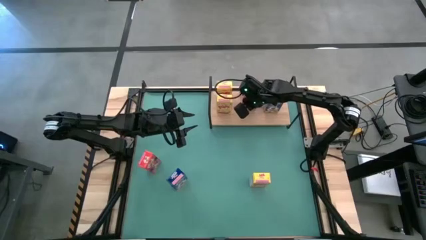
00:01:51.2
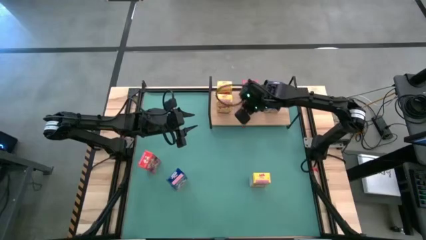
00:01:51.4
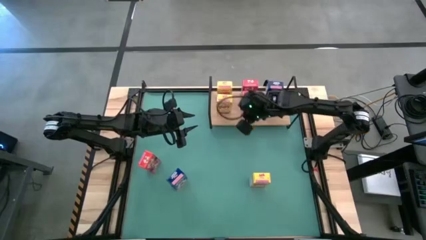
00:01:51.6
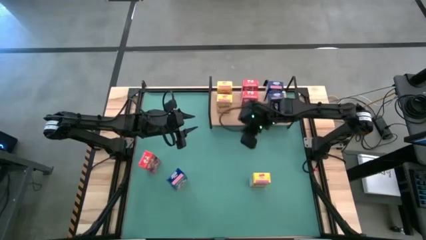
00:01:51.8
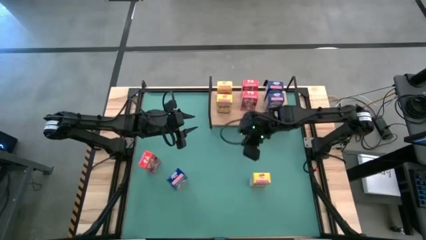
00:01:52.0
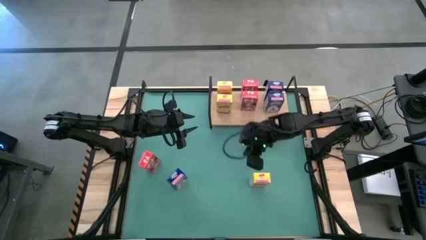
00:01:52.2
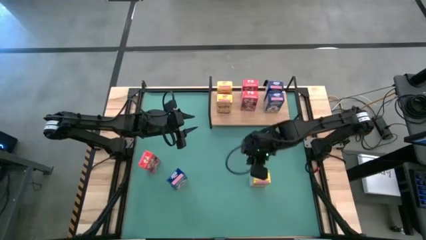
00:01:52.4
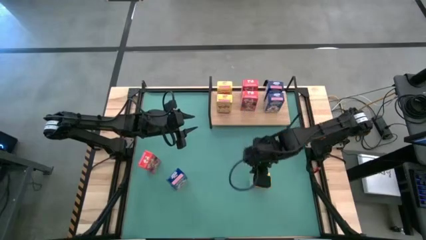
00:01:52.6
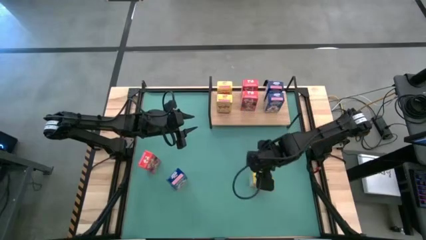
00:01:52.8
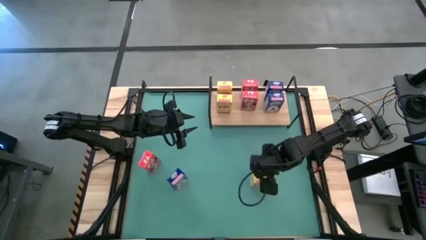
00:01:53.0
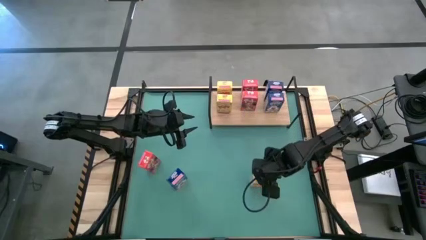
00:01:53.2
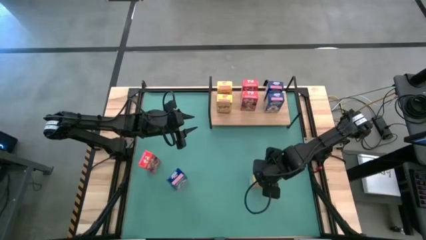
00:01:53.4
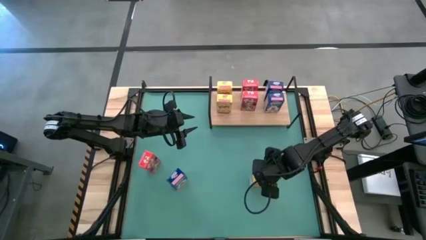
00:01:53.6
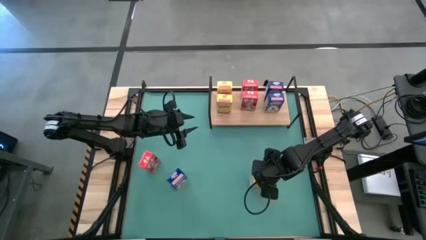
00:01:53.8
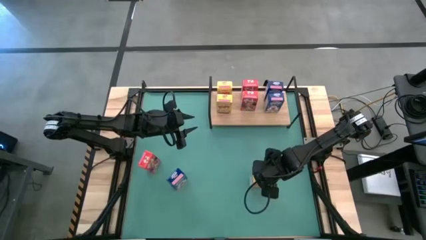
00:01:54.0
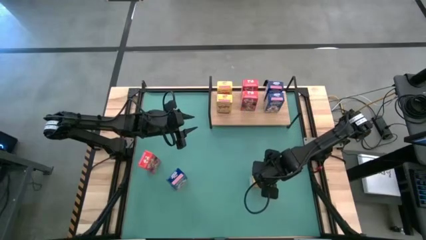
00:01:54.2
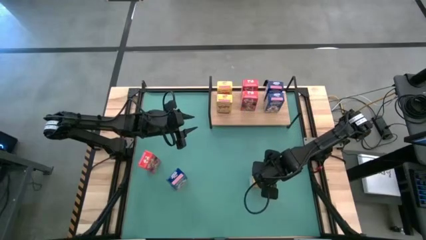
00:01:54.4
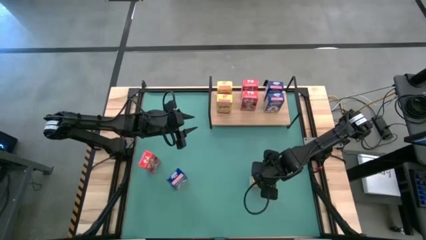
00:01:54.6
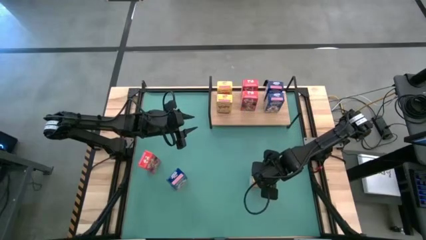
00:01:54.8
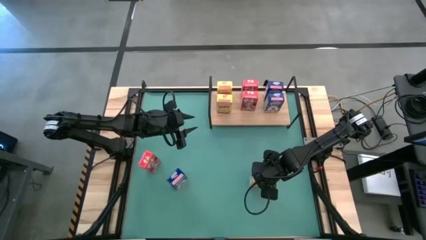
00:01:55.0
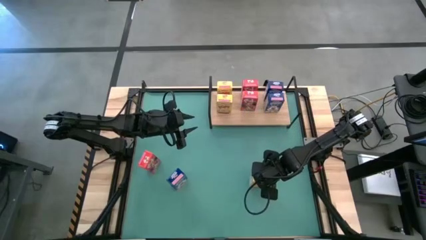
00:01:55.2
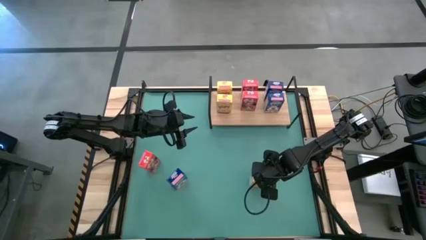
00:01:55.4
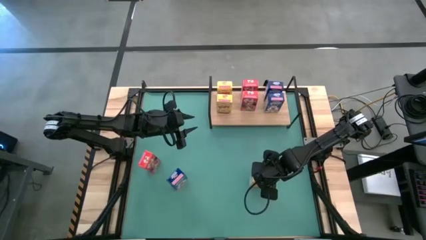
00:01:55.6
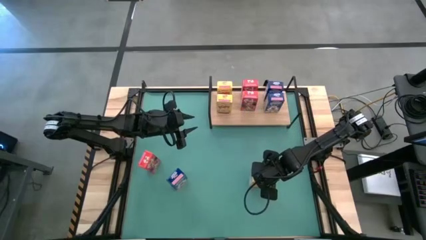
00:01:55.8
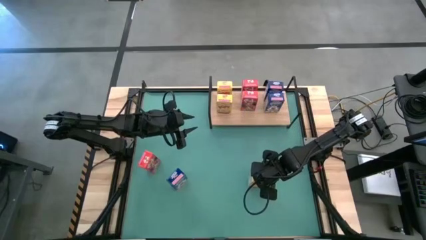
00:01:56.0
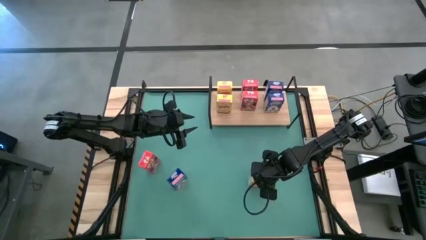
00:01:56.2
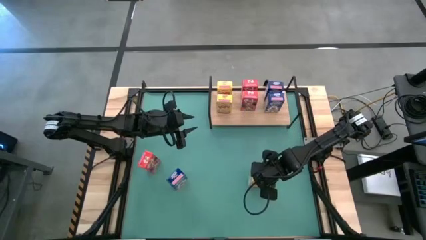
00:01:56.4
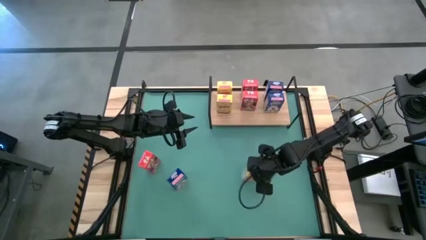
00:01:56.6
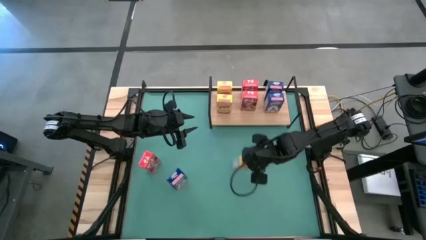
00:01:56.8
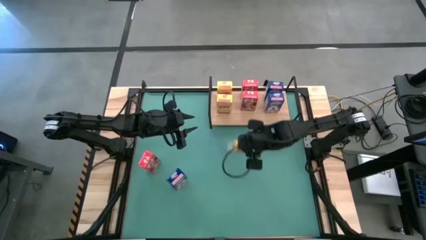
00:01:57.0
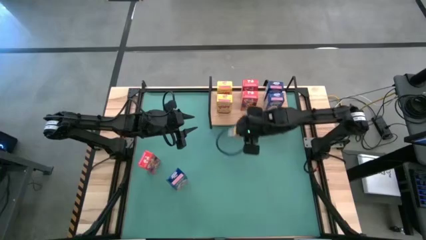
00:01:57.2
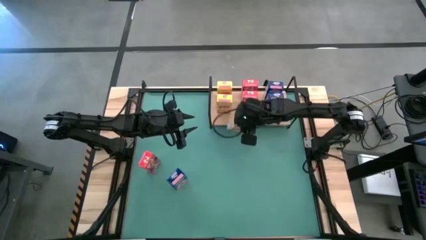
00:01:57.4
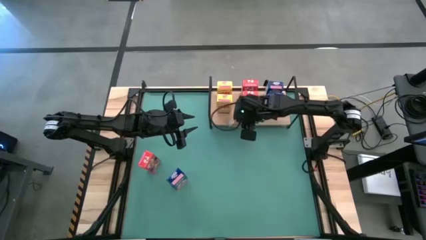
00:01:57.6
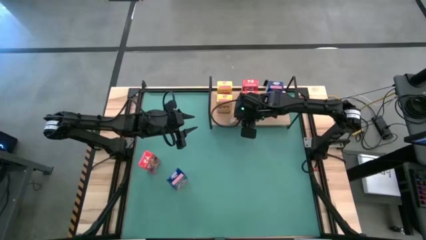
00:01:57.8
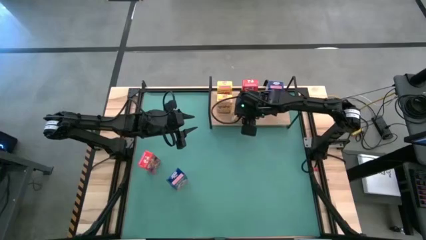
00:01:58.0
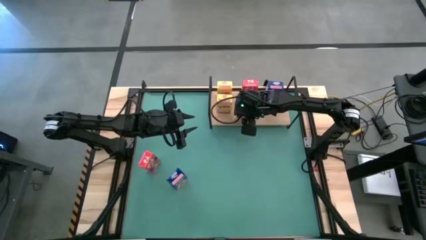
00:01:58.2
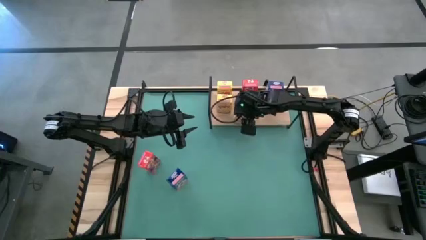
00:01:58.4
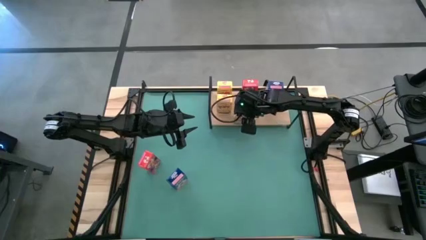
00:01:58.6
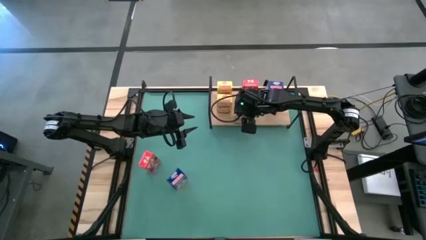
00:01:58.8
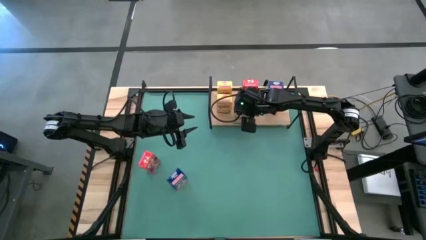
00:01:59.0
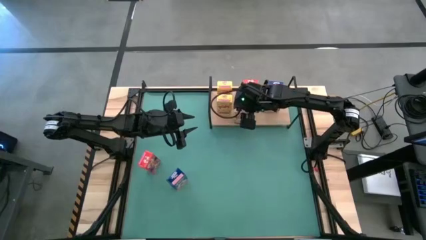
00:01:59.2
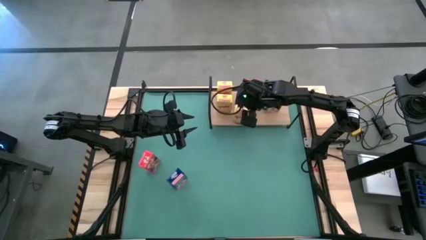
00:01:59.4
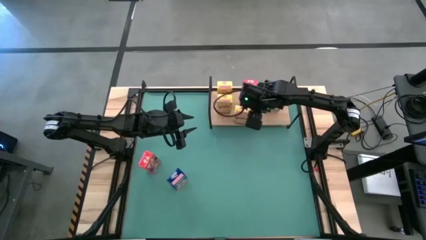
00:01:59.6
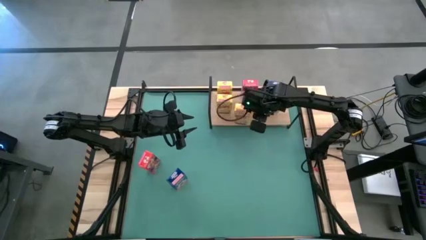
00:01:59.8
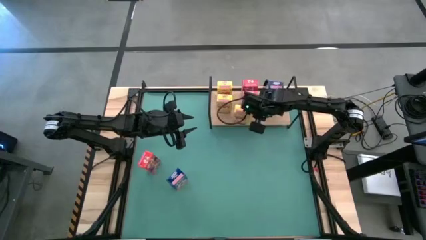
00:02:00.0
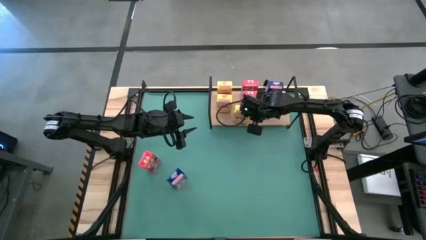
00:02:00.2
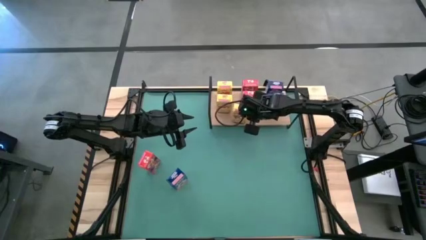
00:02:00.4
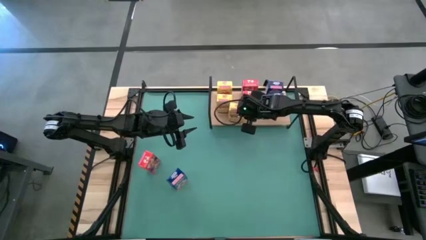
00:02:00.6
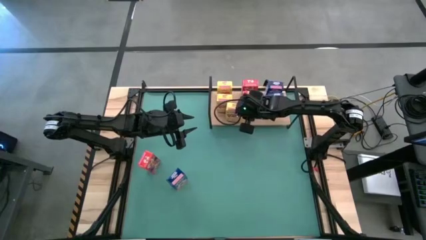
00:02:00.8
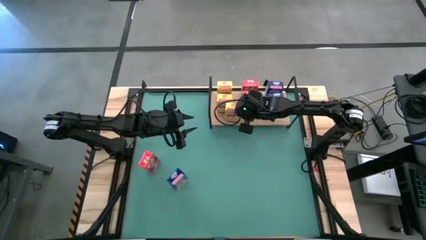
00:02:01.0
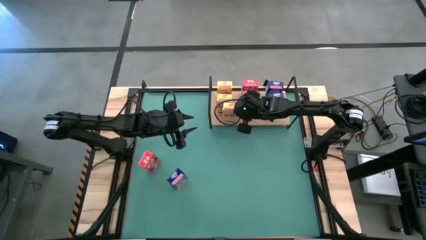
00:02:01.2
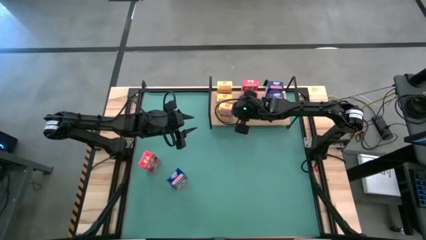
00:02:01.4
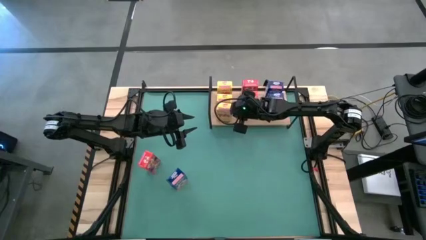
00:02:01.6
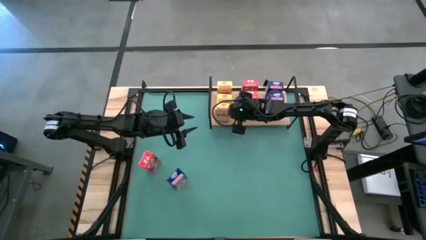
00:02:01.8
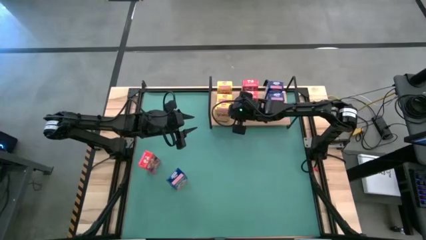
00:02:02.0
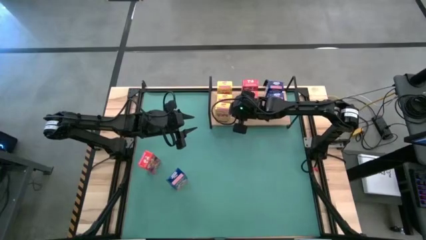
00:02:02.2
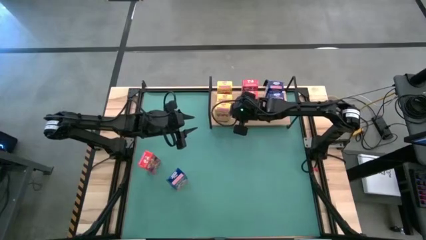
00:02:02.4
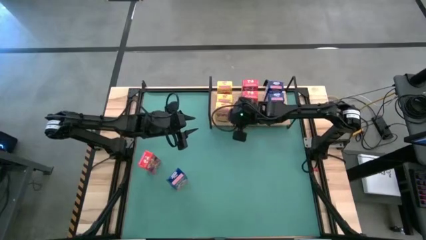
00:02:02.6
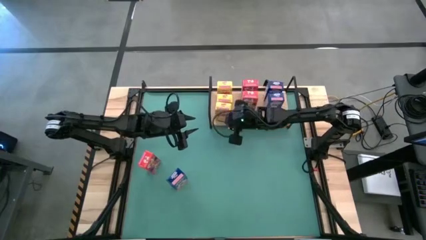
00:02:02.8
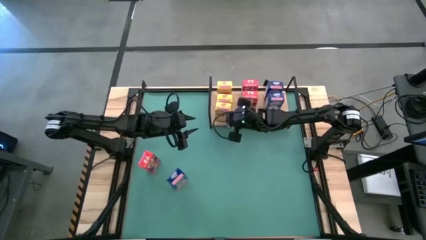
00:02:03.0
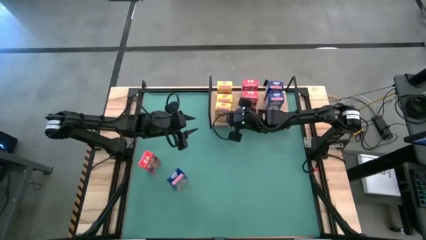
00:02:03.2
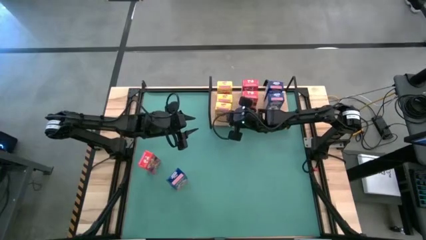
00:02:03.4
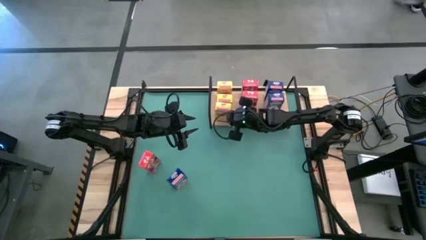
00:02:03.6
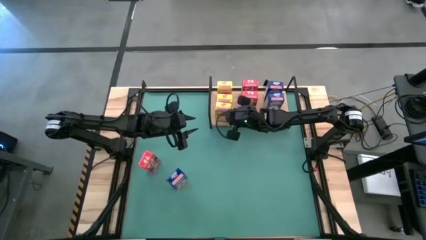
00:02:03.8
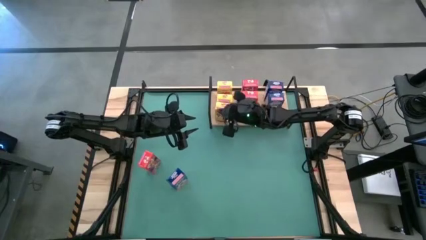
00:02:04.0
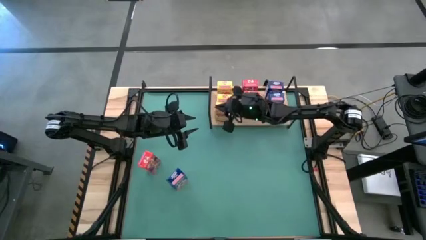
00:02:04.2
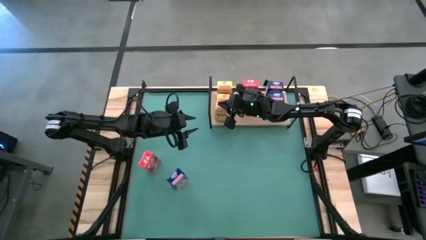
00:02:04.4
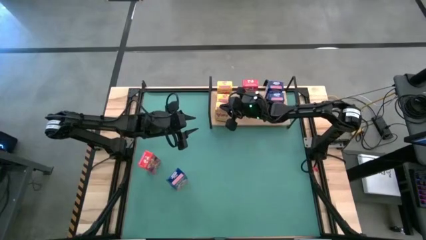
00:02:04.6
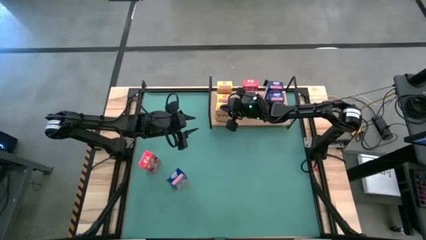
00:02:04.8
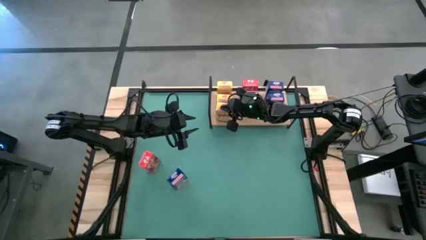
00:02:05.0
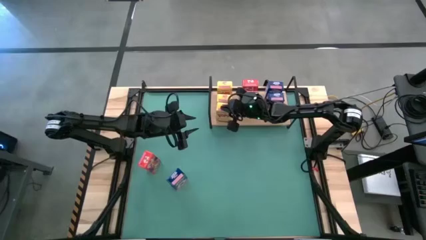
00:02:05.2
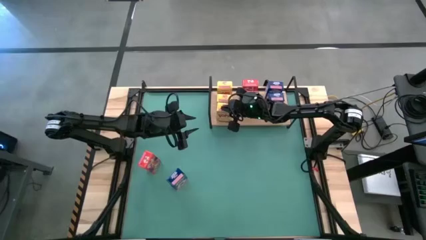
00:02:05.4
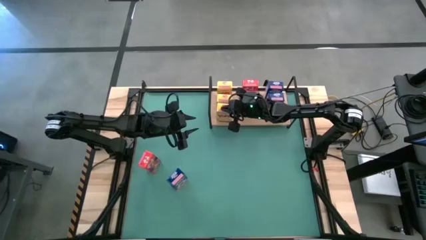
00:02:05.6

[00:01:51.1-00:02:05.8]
Task: Stack cereal on shelf
Put the yellow cereal box on the shelf aligned with the other yellow cereal boxes
